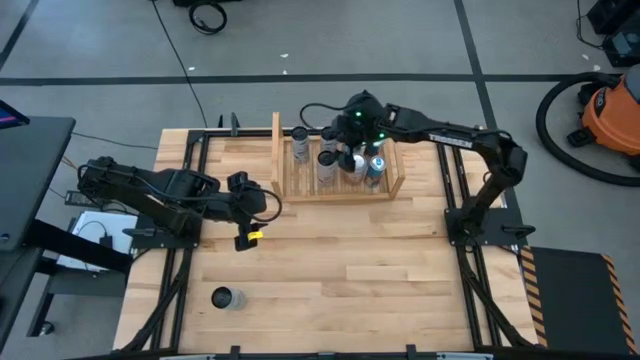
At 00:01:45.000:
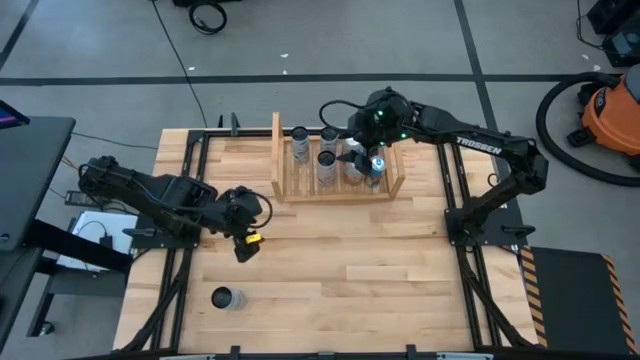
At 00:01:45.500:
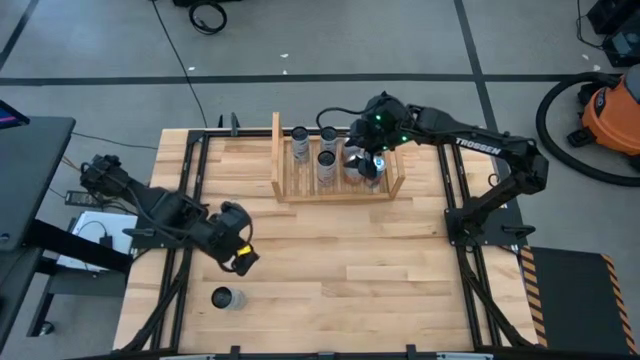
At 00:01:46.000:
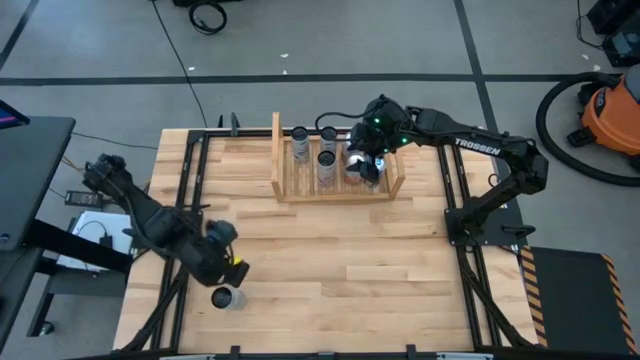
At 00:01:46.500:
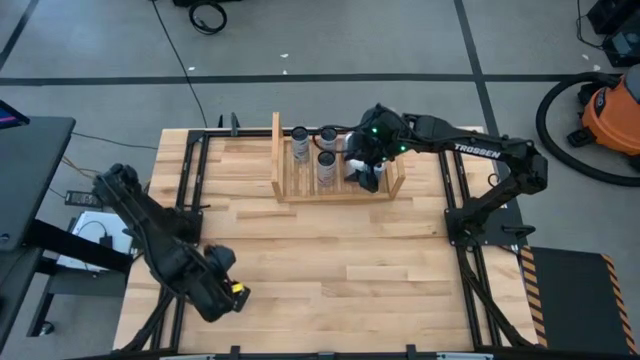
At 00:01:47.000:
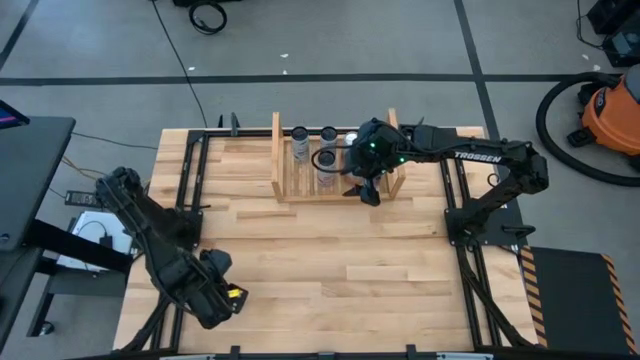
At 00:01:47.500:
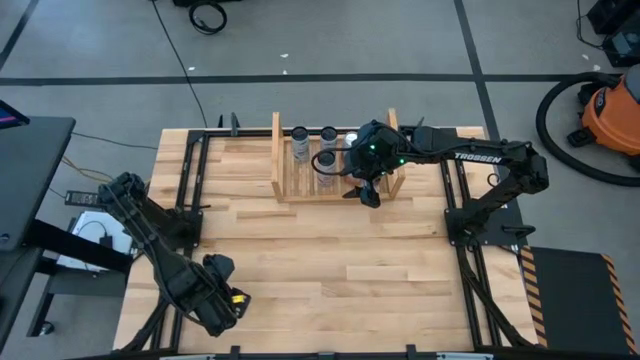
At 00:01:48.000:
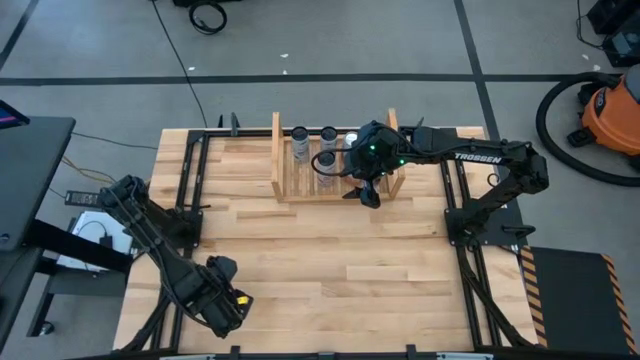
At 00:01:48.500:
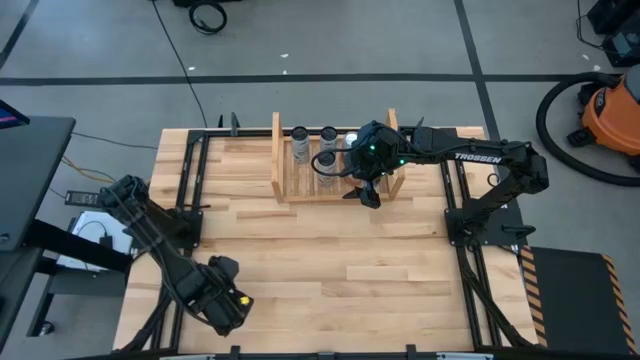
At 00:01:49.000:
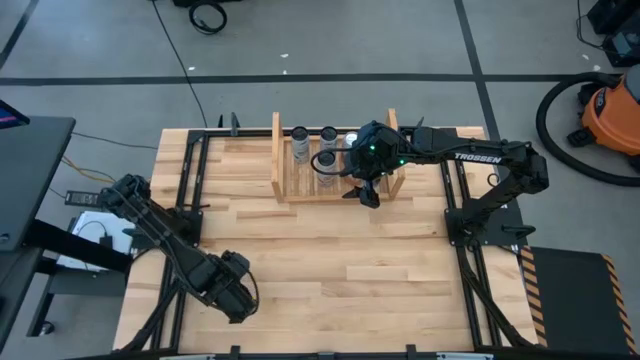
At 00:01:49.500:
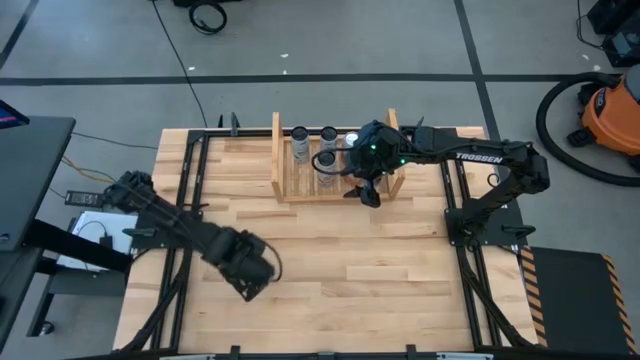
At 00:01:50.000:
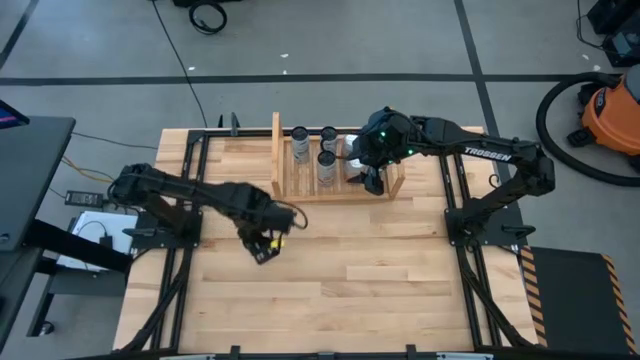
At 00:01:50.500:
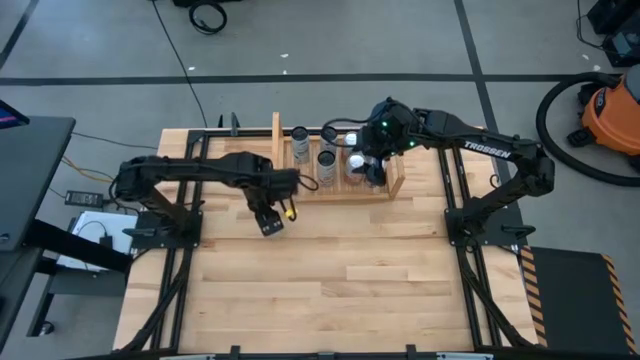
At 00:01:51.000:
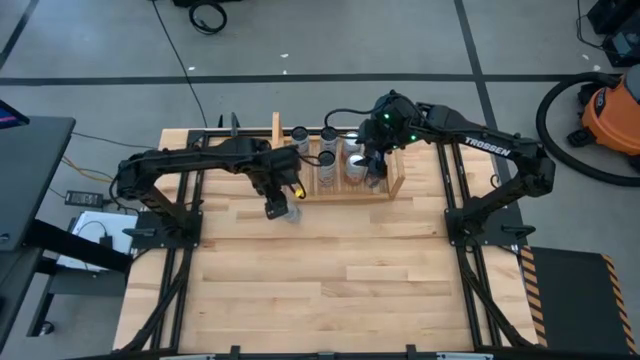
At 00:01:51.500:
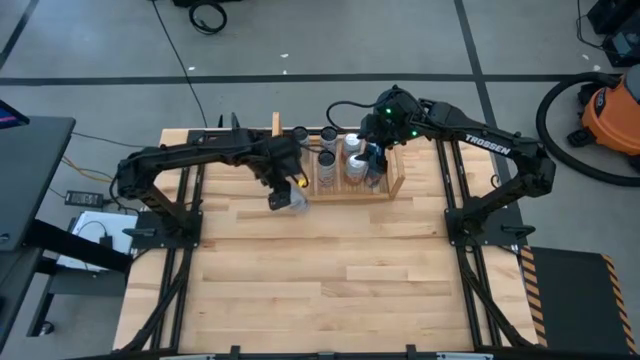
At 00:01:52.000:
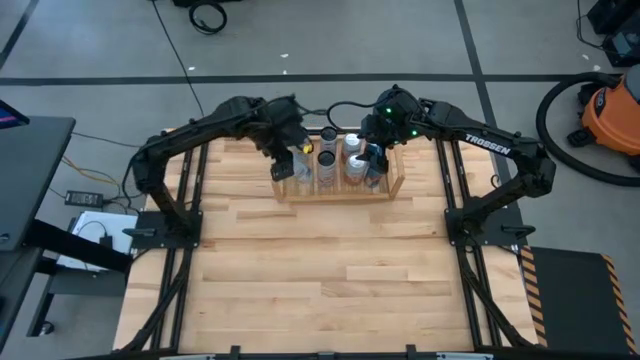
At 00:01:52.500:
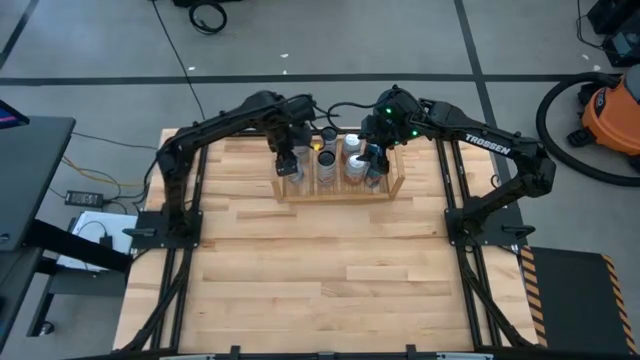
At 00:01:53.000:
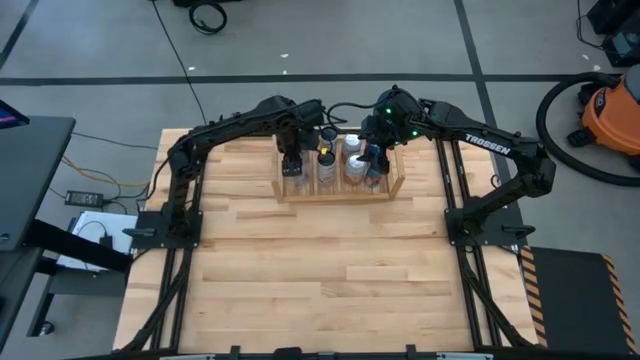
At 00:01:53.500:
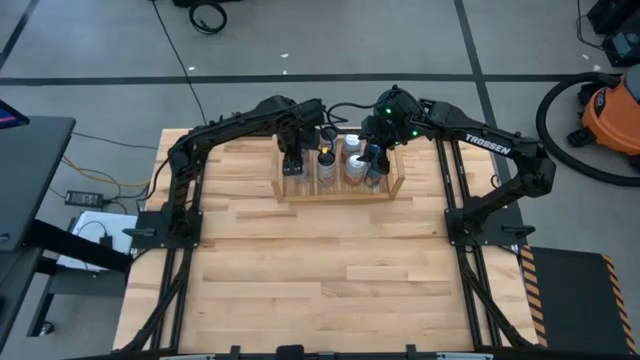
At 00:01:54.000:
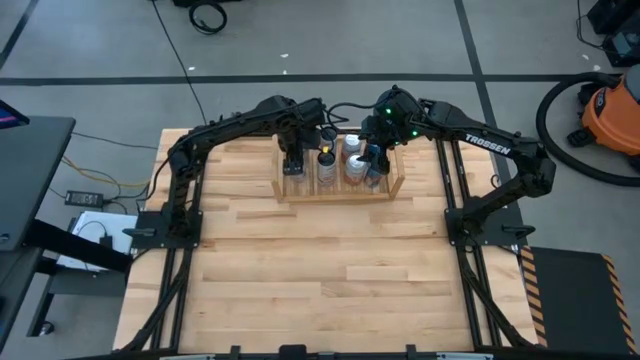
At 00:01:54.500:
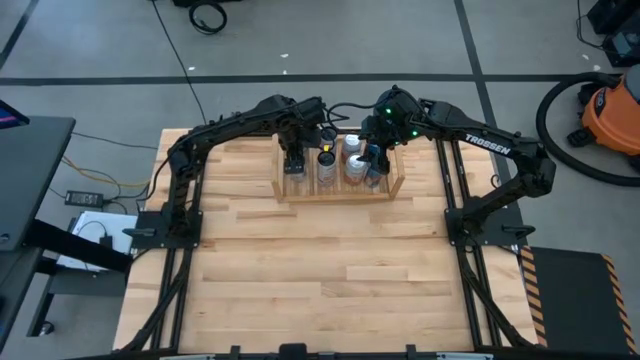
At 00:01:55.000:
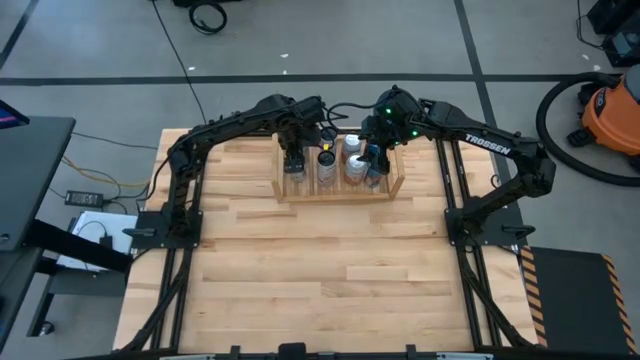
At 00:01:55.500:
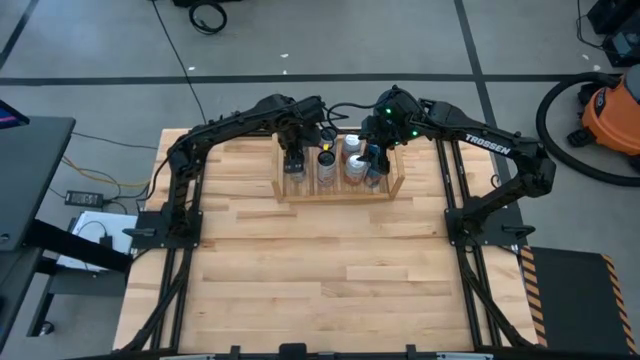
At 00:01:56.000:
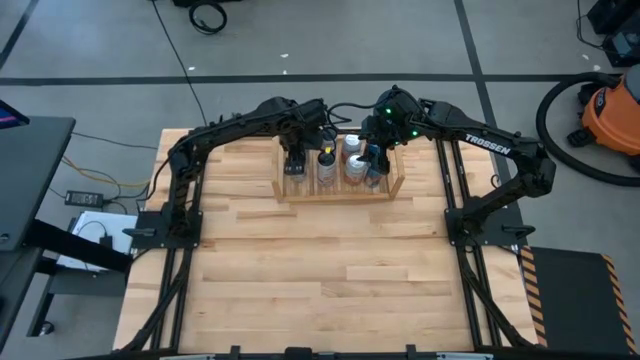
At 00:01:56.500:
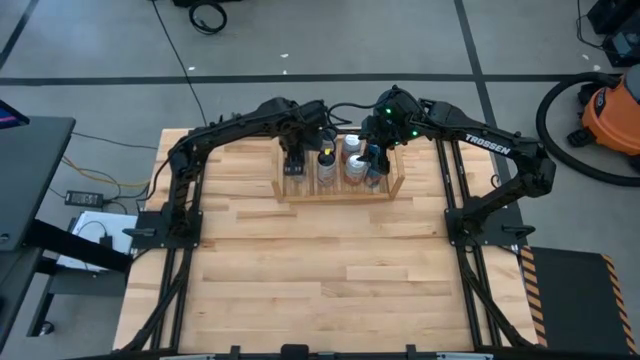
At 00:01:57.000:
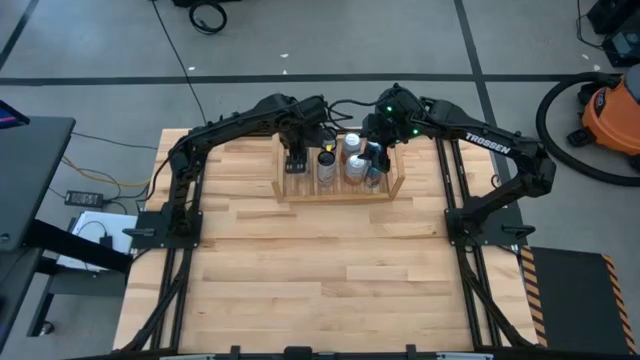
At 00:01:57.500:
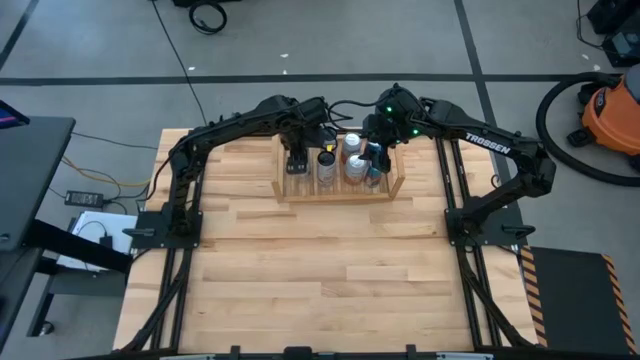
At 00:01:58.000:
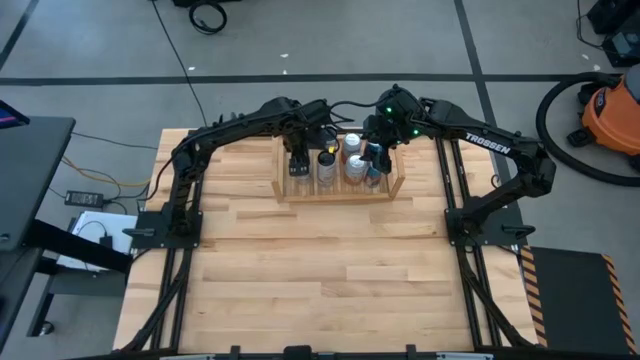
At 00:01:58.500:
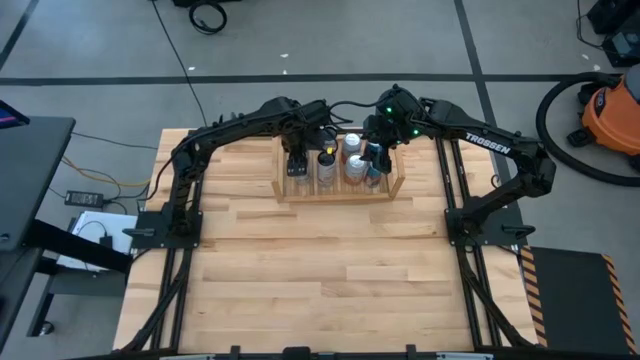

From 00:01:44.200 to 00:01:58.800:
Task: Place canned beverage on shelf
Put the white pink soda can into the shelf
